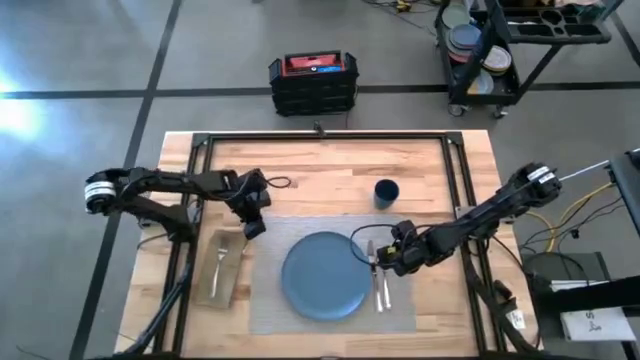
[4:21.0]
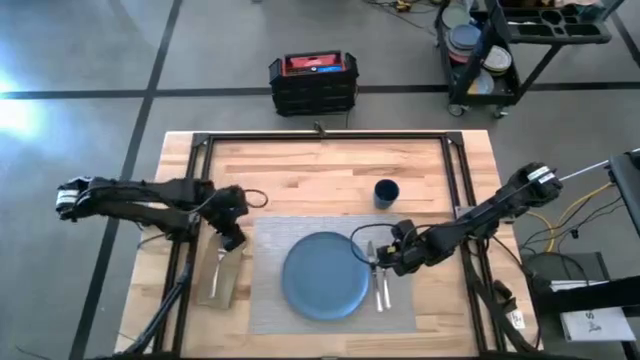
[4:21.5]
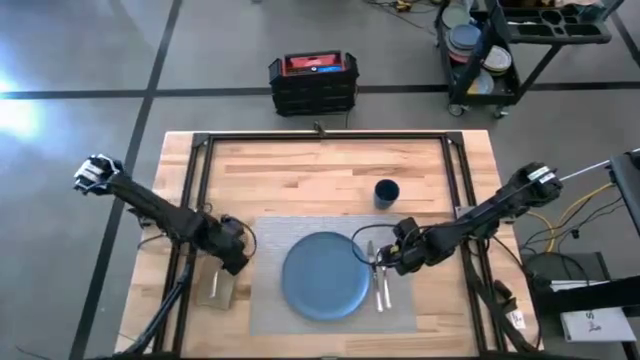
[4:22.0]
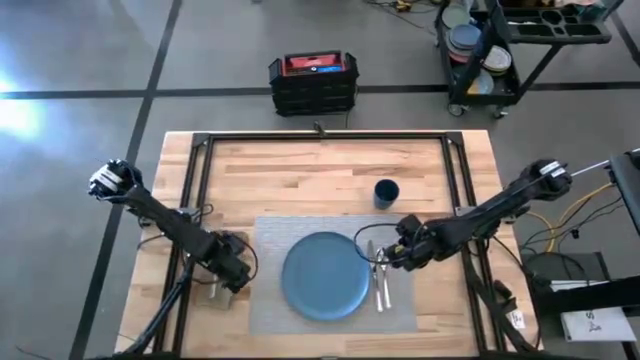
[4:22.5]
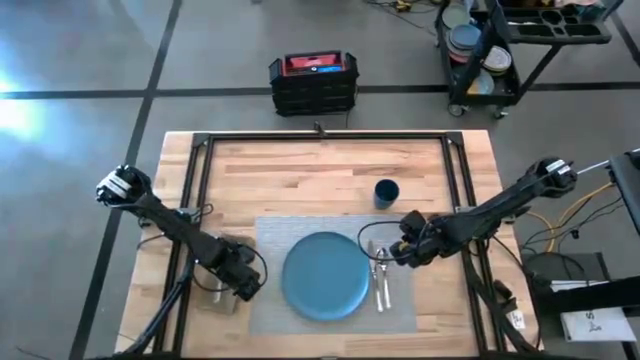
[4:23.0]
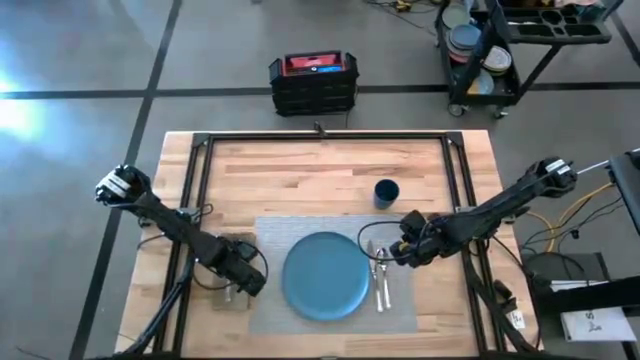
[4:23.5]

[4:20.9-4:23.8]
Task: Set table place
Adjust the brown table napkin

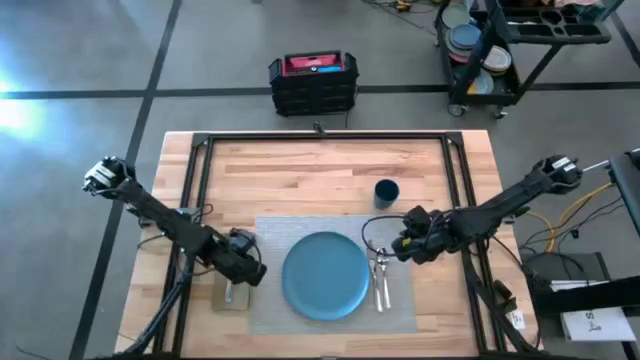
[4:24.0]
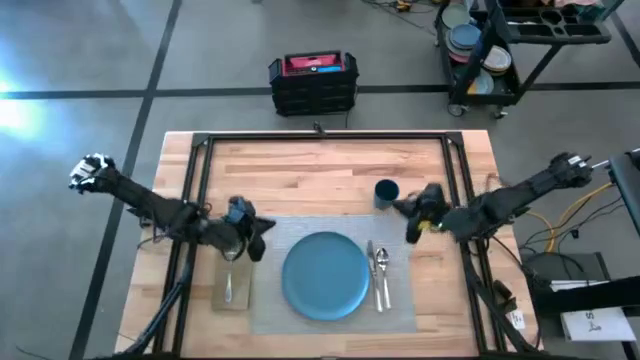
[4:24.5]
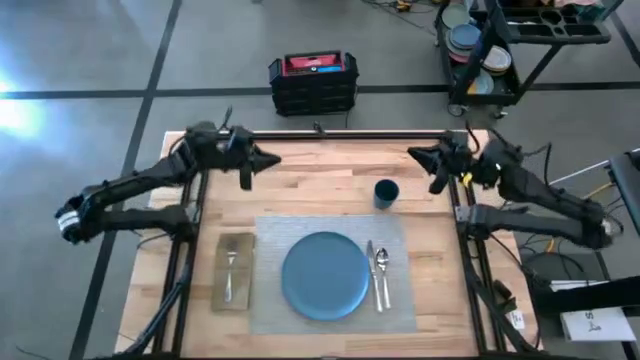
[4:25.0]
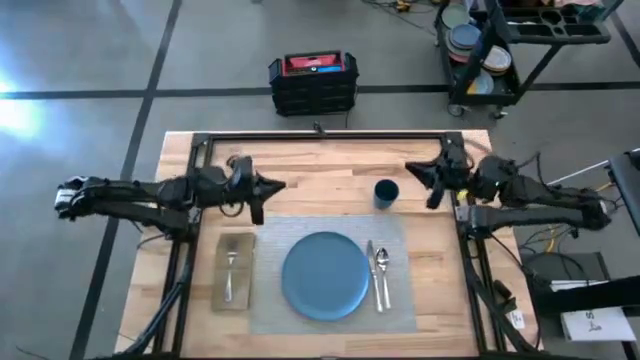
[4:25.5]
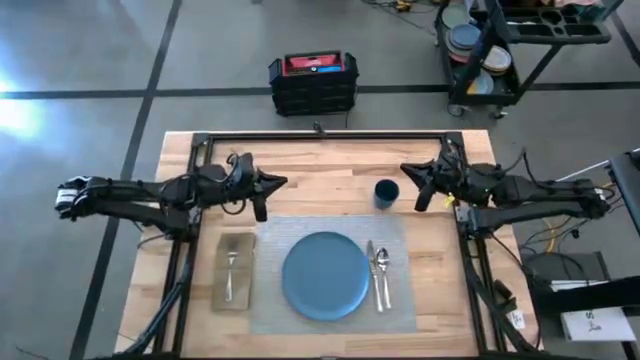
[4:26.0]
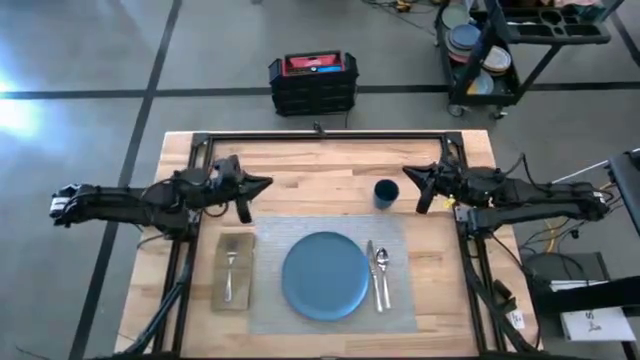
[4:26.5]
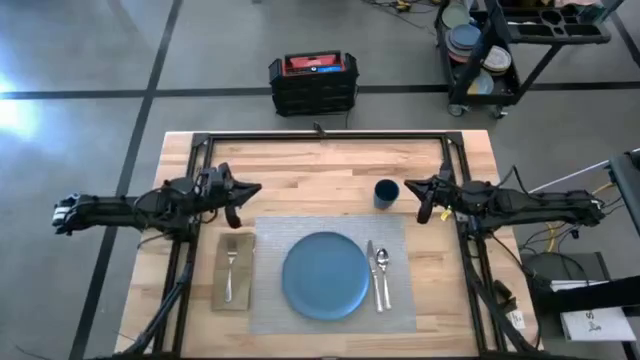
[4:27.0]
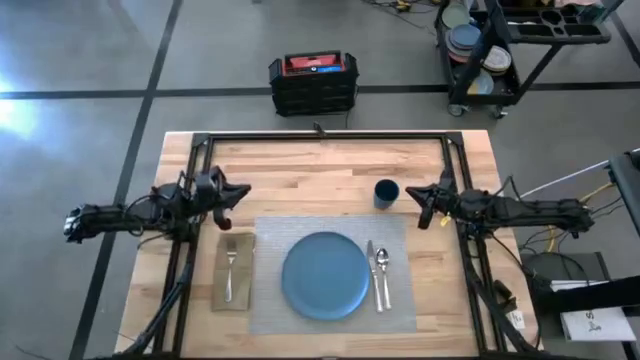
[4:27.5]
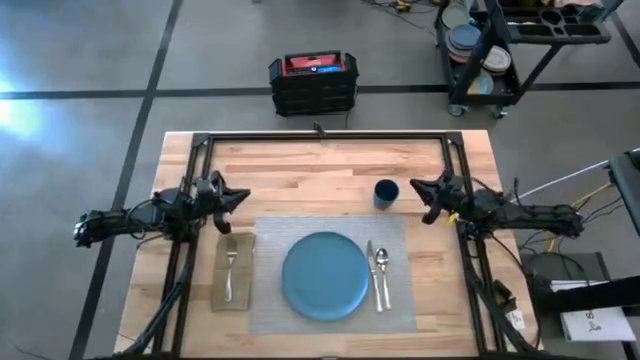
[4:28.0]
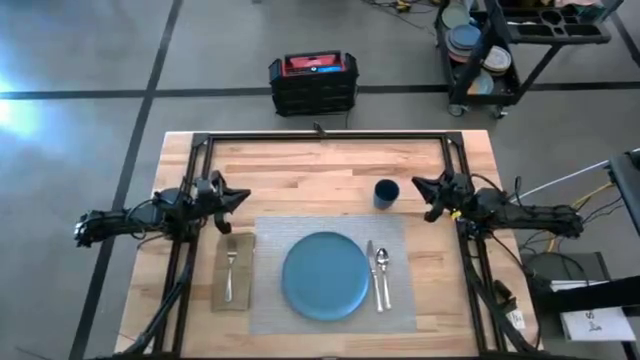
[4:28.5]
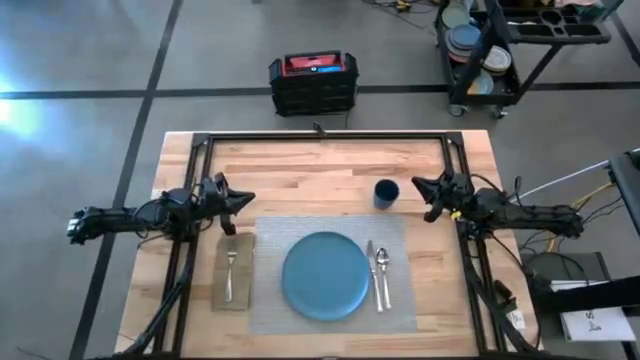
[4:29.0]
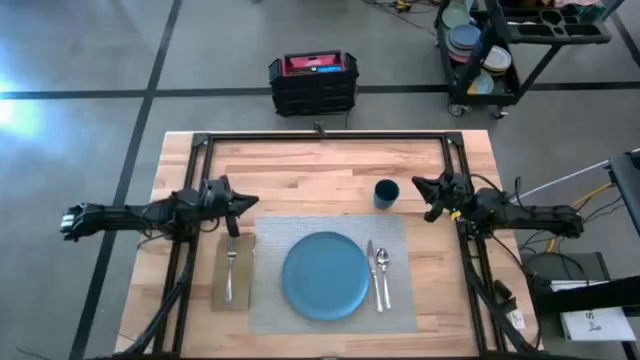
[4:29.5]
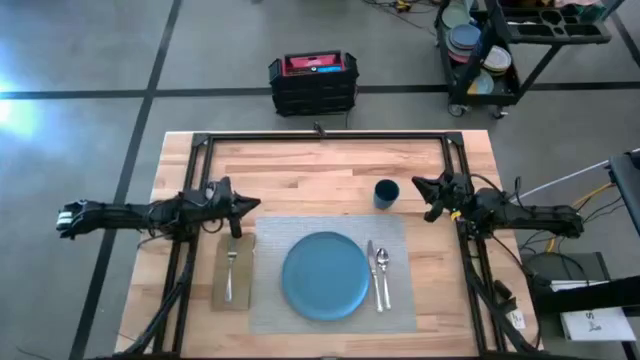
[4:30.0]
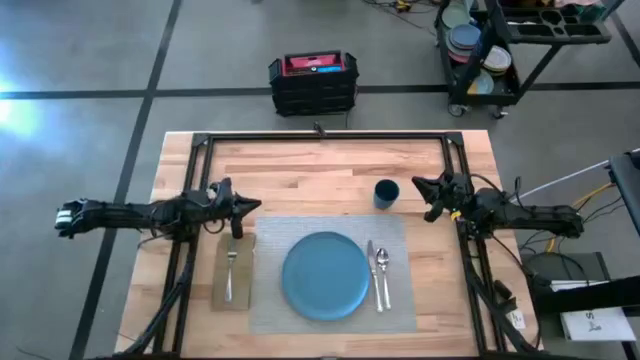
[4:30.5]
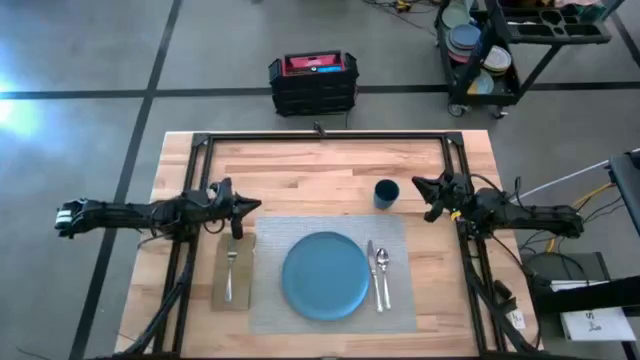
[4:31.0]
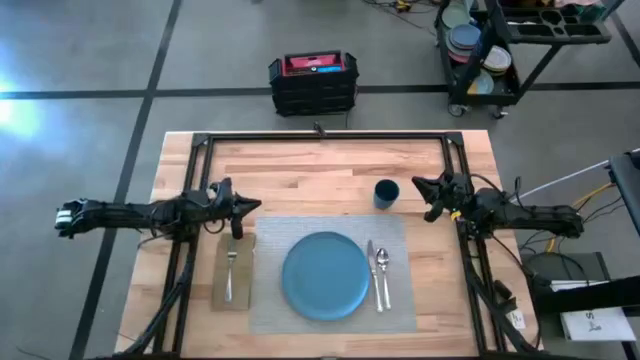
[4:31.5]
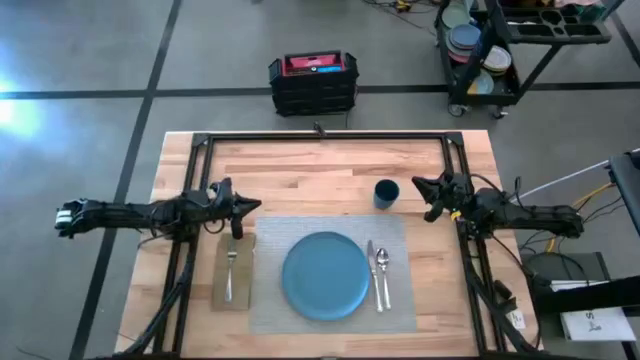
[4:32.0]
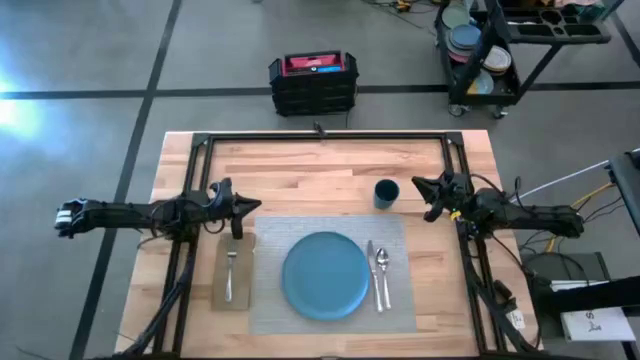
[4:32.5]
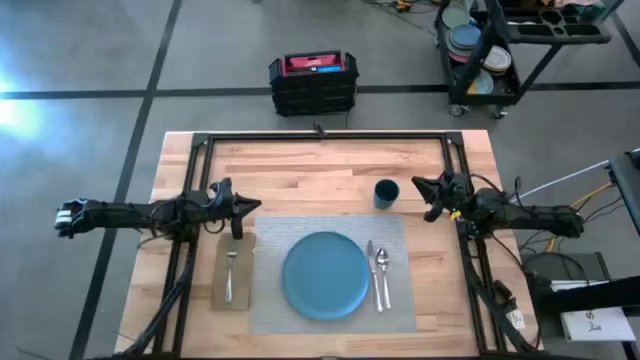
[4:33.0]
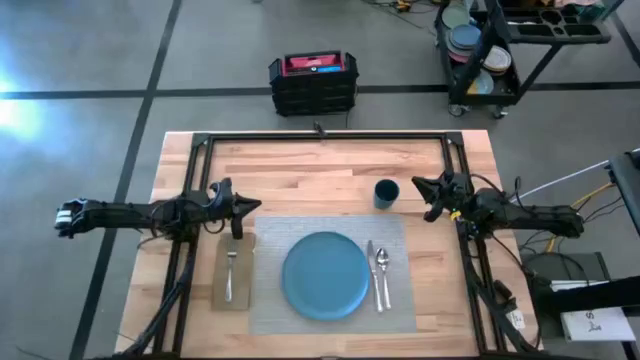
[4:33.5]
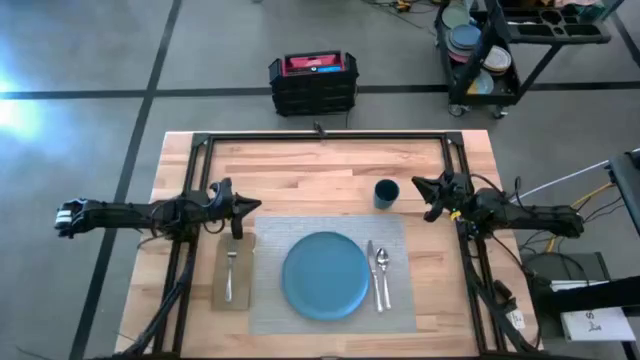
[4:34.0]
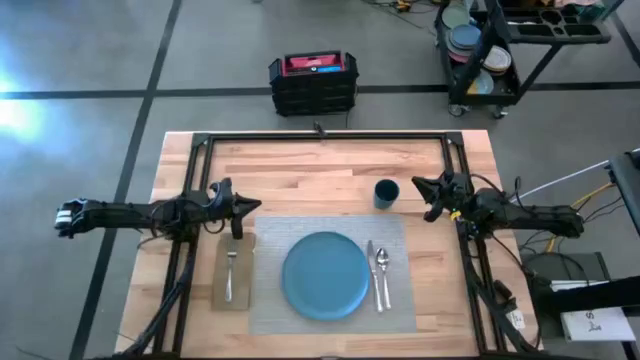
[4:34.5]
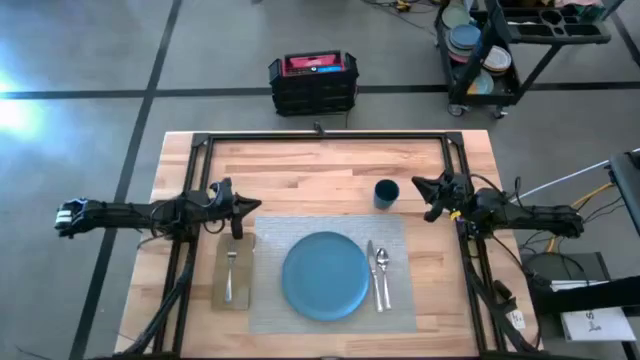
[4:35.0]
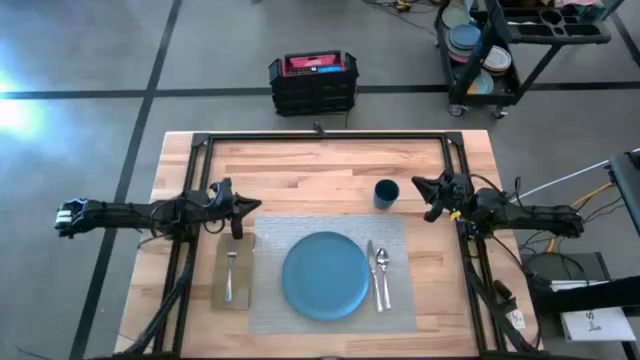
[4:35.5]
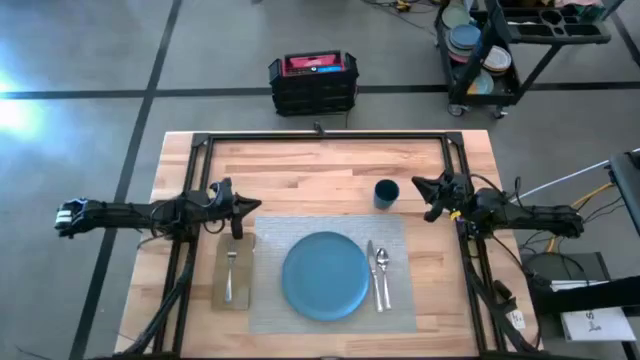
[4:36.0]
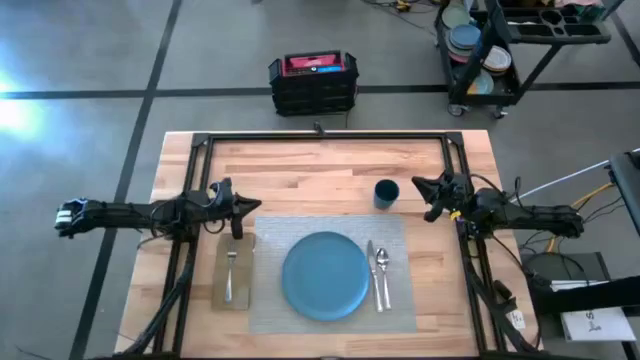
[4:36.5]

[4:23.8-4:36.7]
Return to Home Position

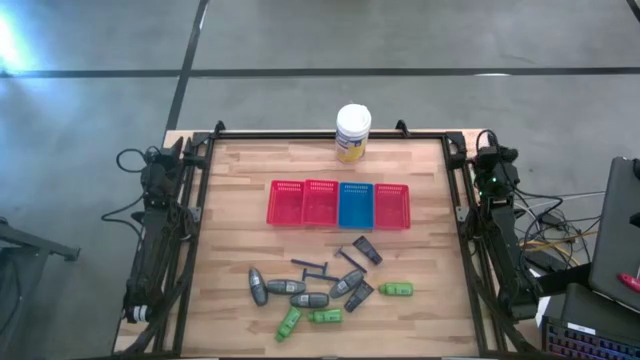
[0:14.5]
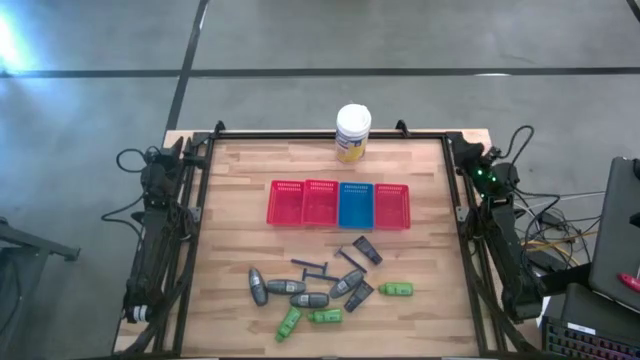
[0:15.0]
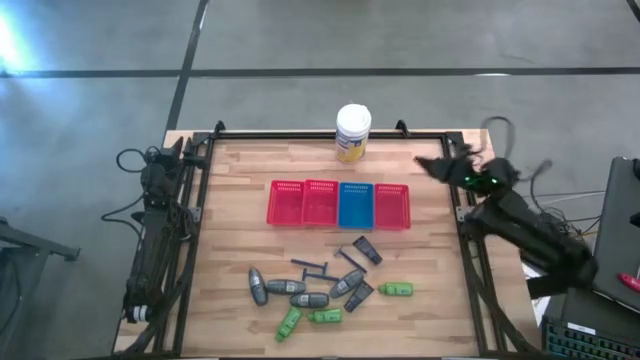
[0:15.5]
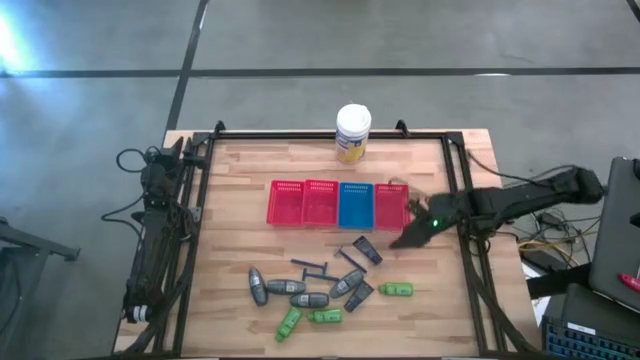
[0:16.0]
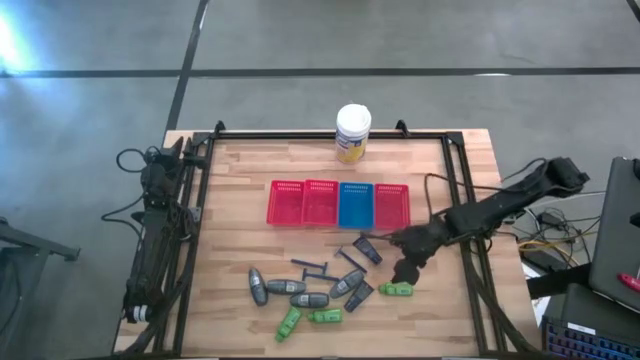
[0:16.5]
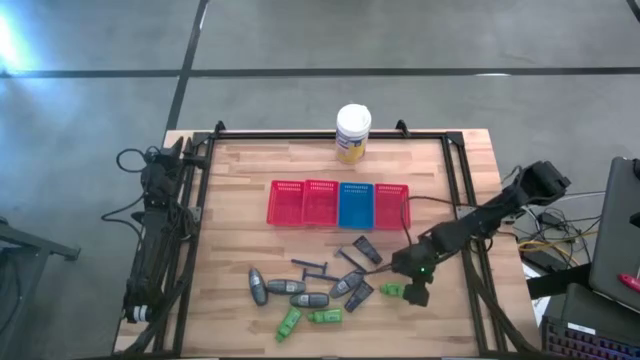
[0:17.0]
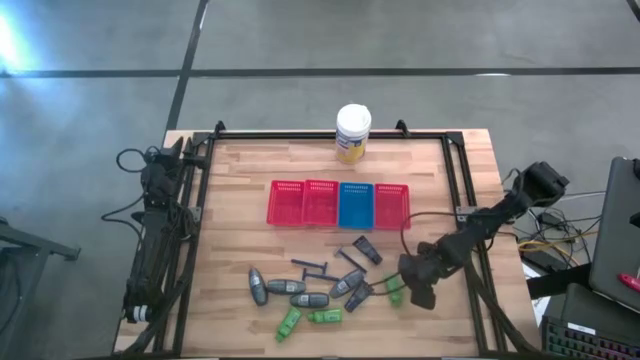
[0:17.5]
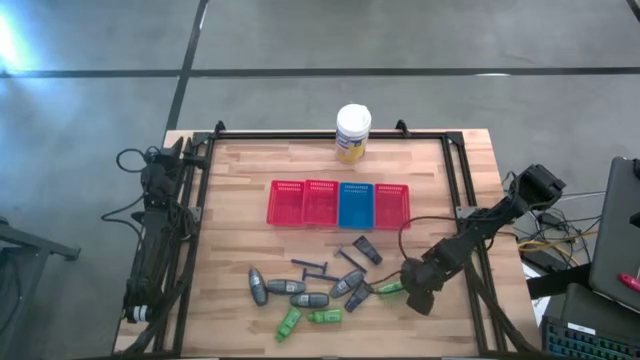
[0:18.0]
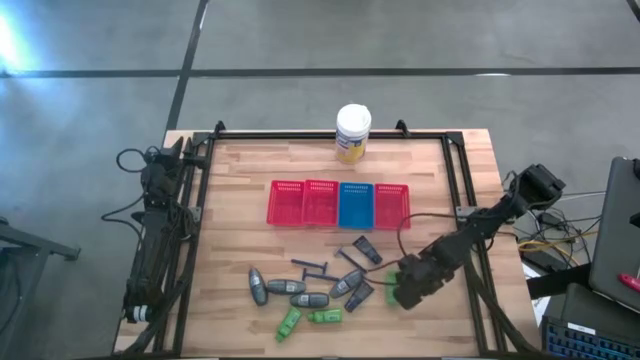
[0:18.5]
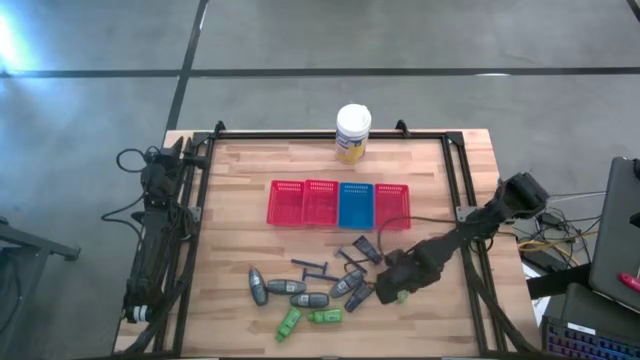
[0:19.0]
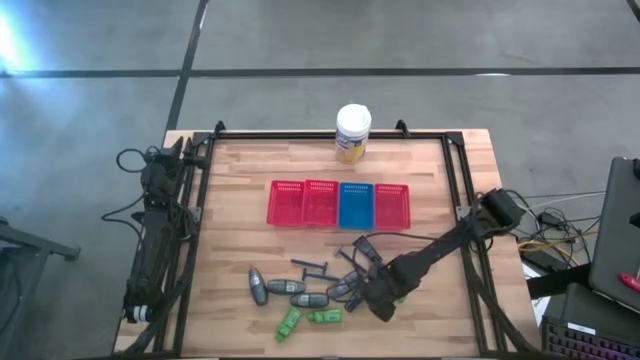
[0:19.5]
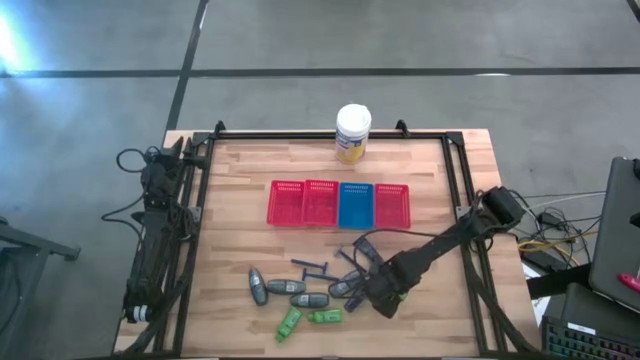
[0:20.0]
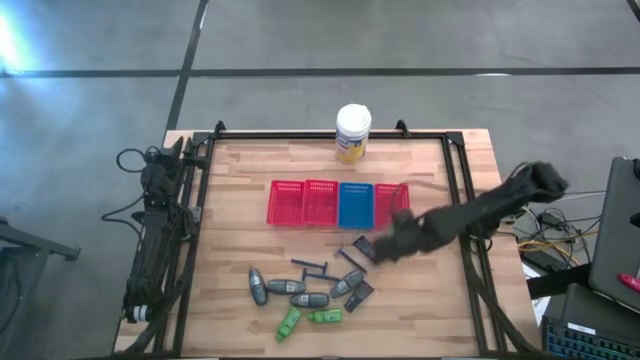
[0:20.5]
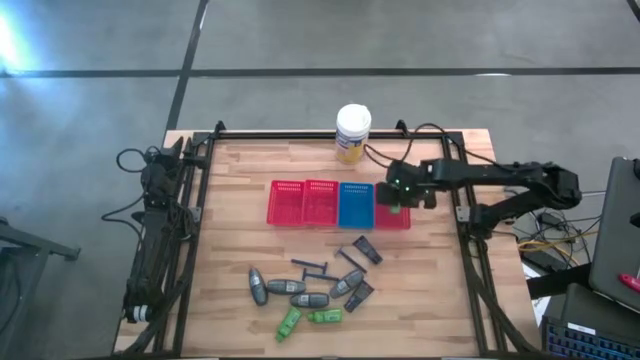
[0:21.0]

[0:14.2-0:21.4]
Task: Pick & Place Travel size toiletries
Put the green shampoo into the right red bin
